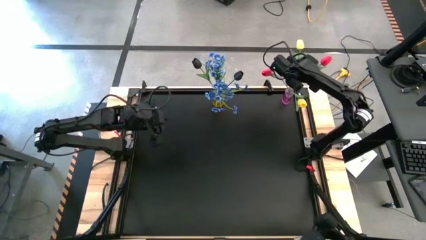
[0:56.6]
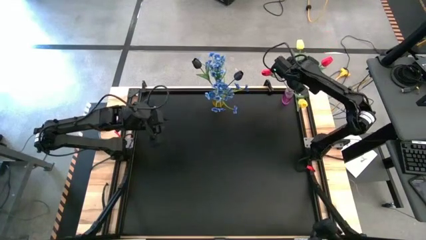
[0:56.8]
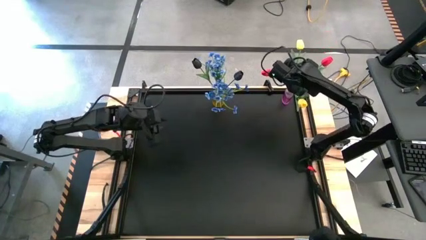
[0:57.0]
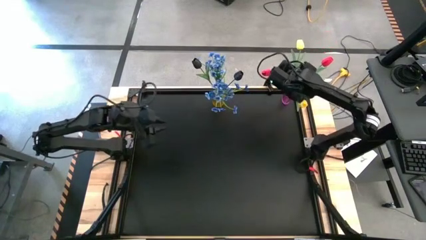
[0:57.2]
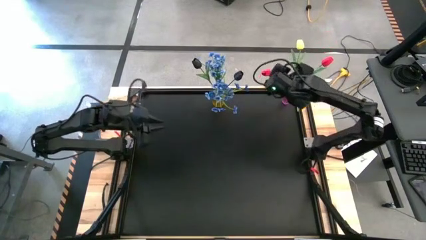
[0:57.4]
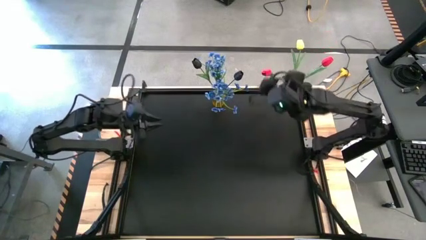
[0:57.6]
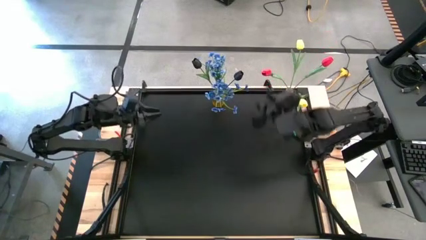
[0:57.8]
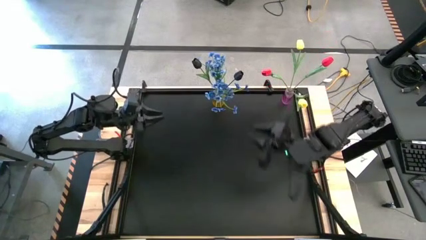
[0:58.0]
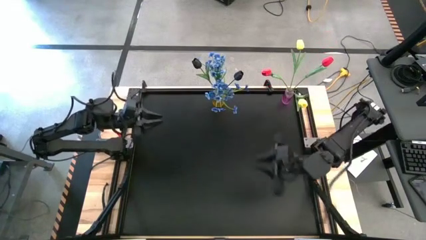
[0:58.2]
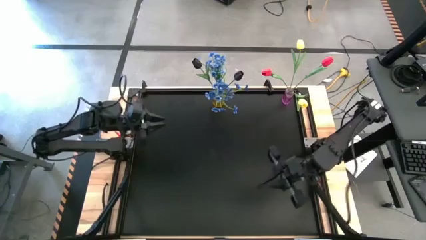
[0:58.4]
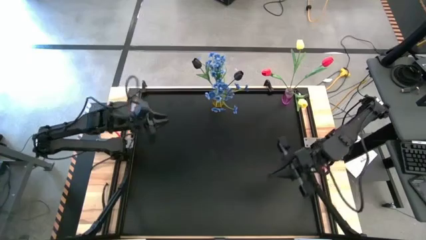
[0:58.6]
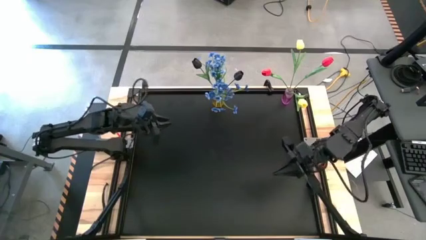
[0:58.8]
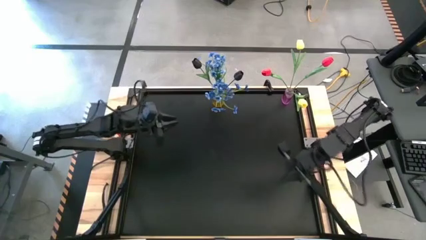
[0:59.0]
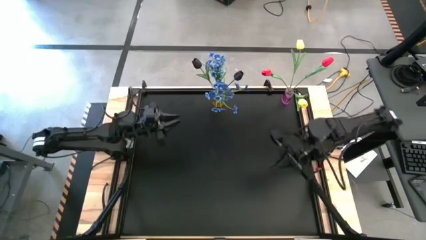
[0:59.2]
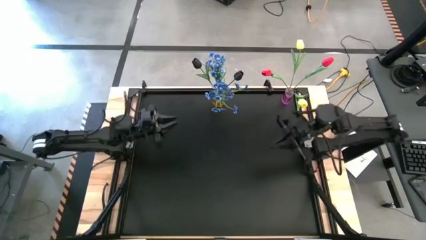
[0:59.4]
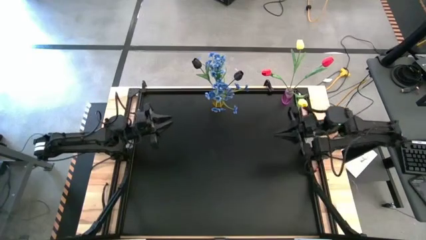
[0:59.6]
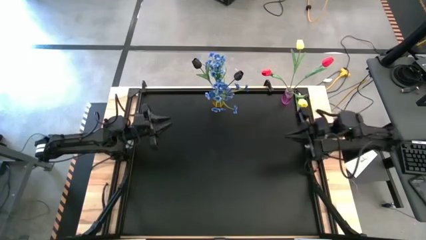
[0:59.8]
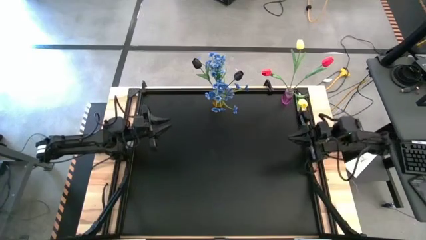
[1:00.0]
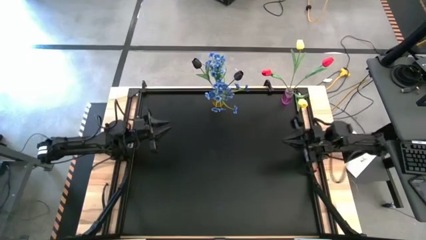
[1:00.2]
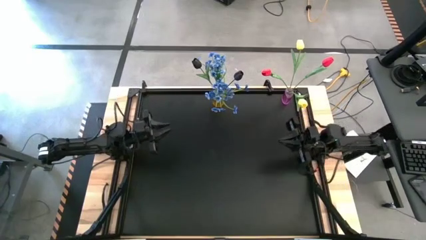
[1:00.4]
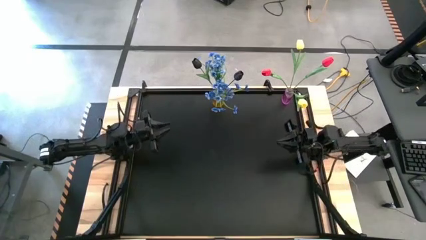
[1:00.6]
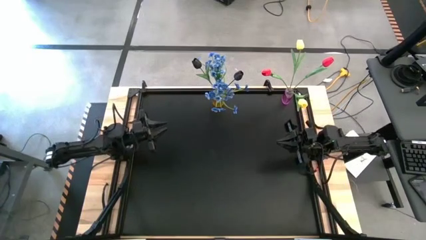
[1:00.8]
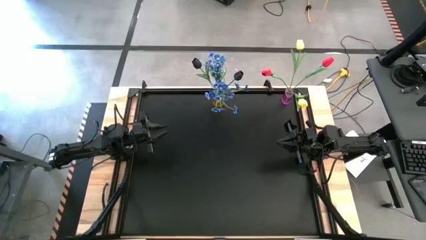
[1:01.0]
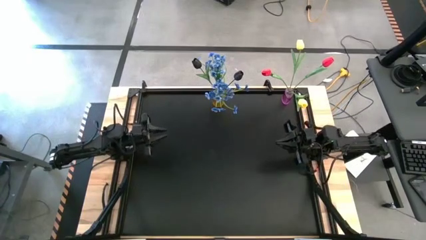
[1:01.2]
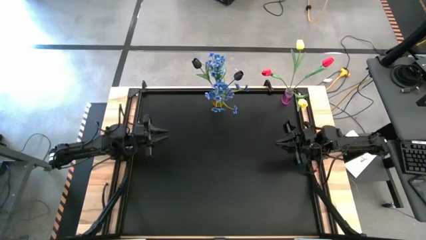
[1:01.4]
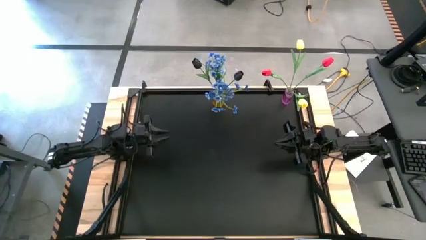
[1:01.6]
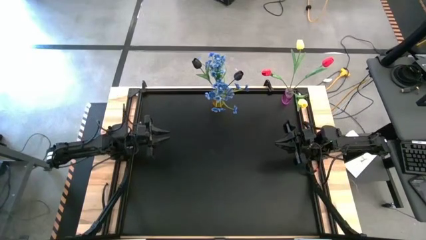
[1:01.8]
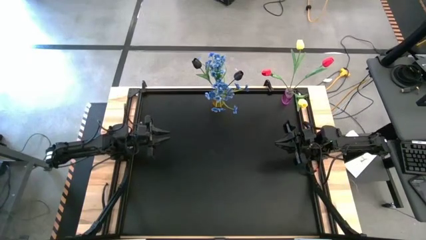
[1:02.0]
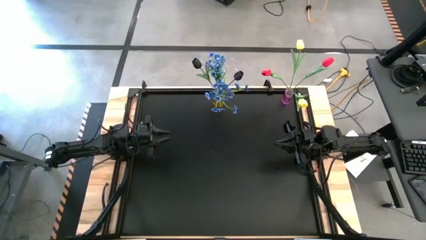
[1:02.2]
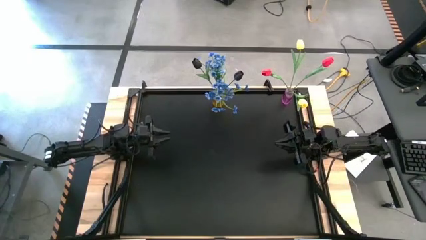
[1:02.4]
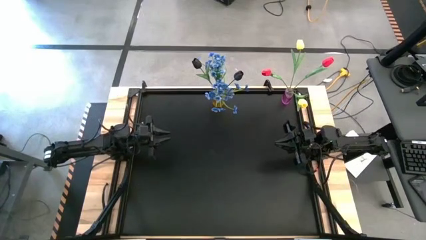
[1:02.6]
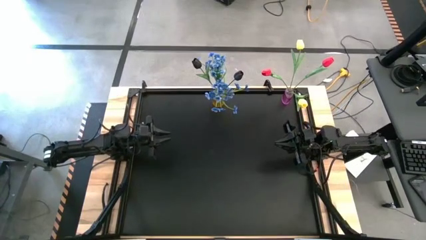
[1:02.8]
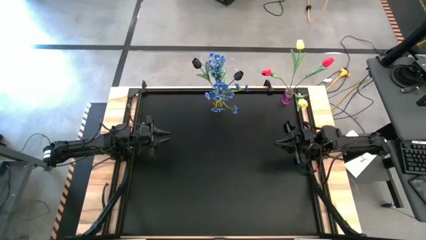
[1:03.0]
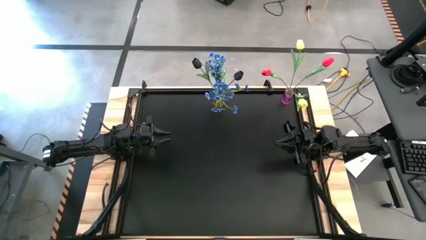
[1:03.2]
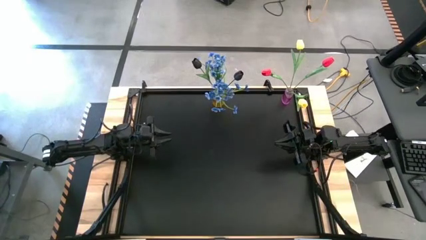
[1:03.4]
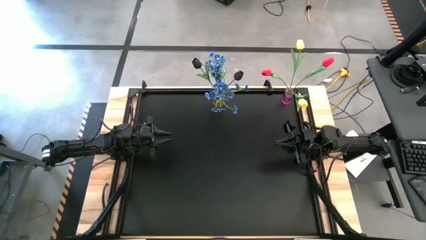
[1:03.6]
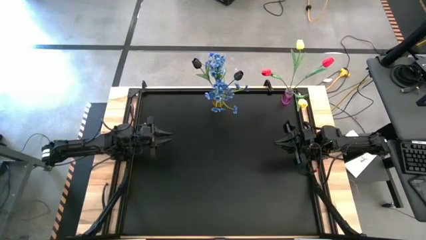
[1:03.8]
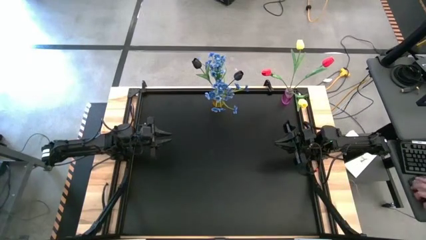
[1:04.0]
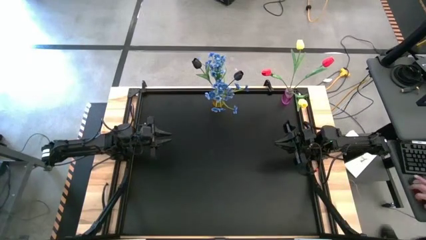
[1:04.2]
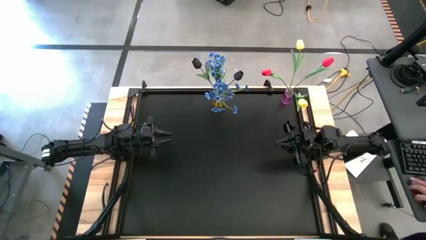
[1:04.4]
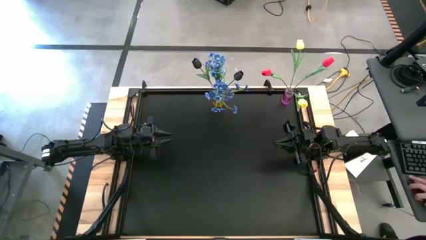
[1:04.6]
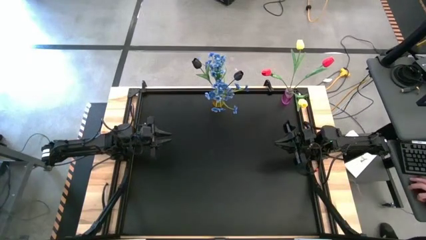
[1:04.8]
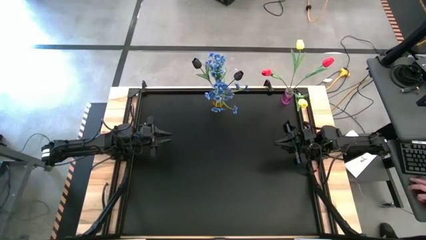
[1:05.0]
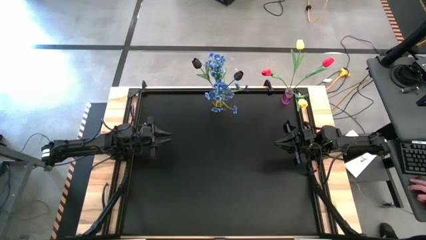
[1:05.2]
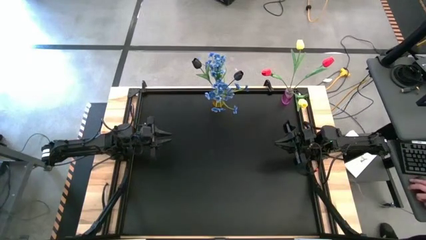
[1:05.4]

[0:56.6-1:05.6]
Task: Sort flowers into vase by color
Return to Home Position

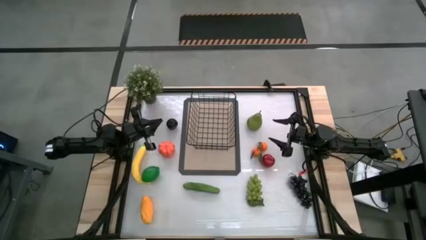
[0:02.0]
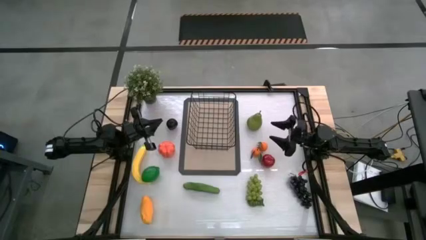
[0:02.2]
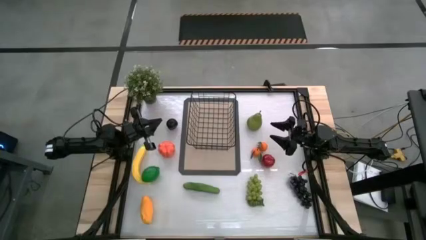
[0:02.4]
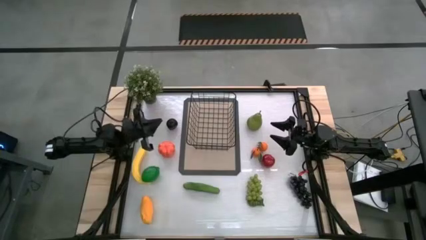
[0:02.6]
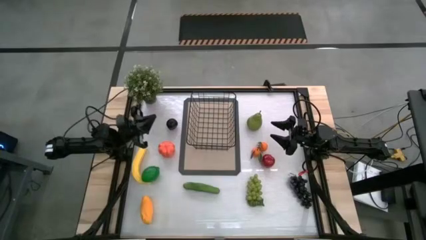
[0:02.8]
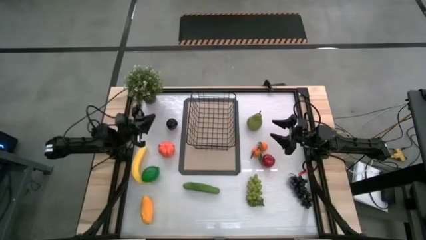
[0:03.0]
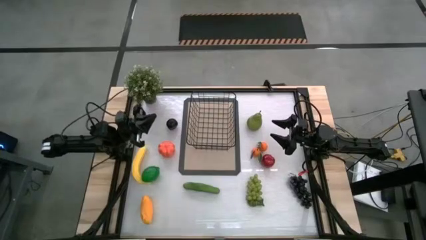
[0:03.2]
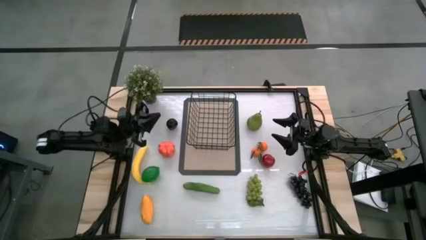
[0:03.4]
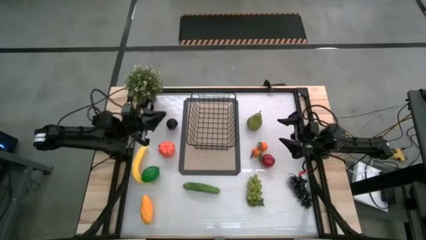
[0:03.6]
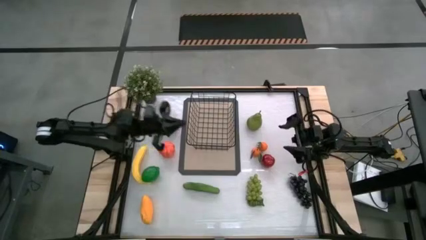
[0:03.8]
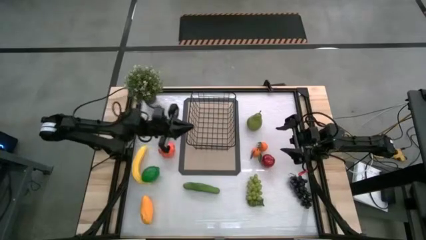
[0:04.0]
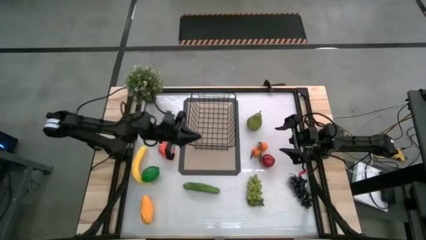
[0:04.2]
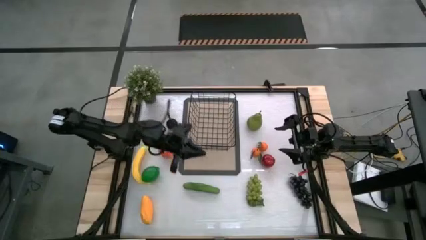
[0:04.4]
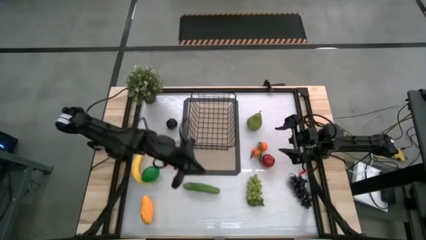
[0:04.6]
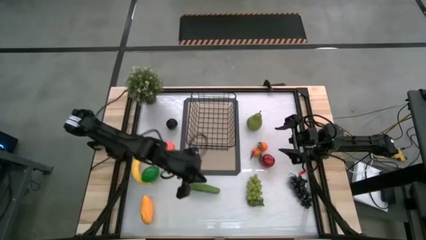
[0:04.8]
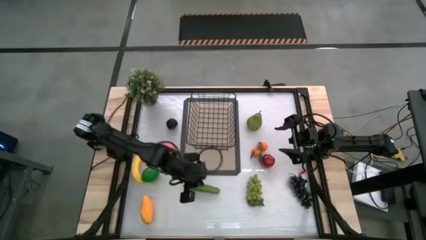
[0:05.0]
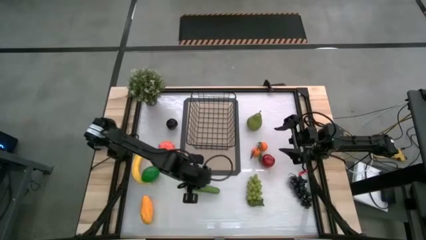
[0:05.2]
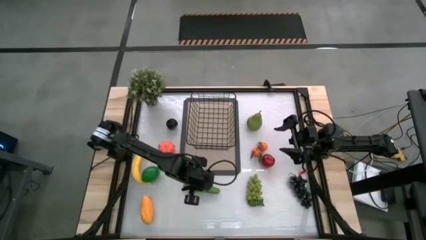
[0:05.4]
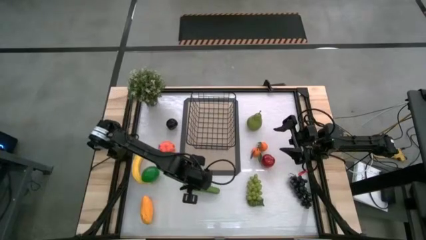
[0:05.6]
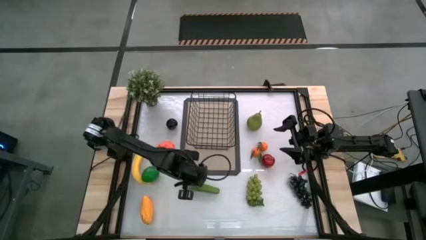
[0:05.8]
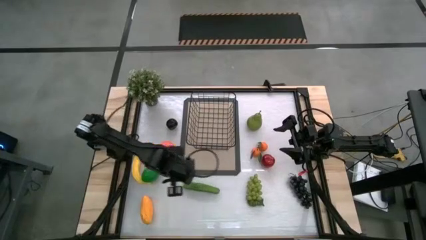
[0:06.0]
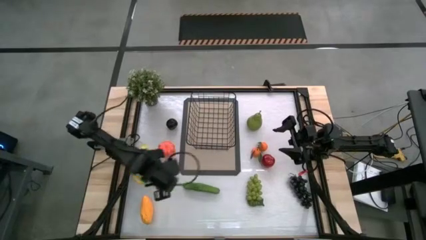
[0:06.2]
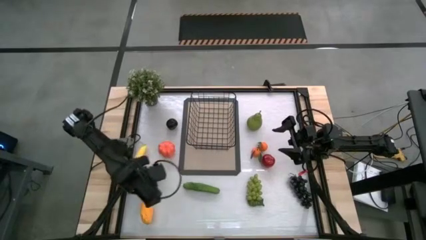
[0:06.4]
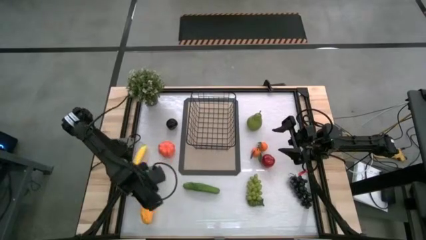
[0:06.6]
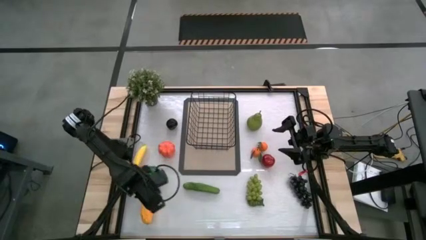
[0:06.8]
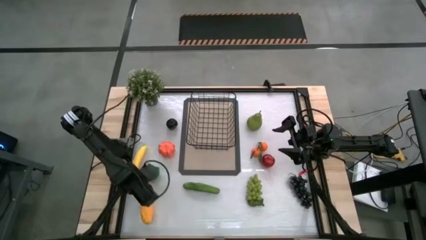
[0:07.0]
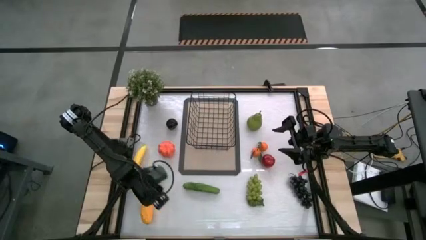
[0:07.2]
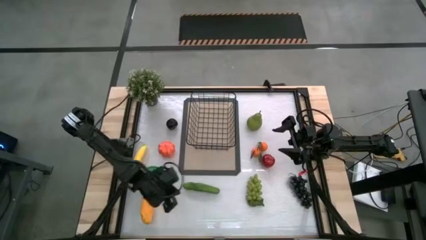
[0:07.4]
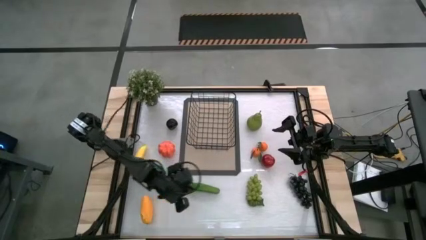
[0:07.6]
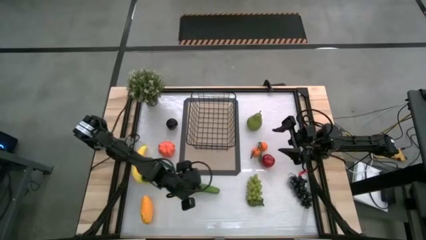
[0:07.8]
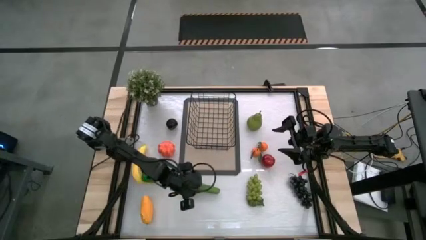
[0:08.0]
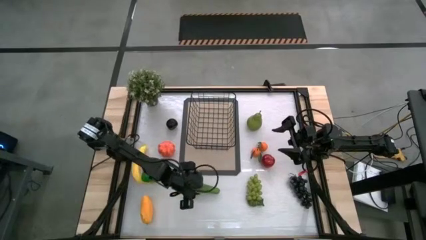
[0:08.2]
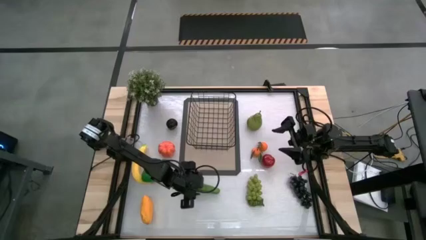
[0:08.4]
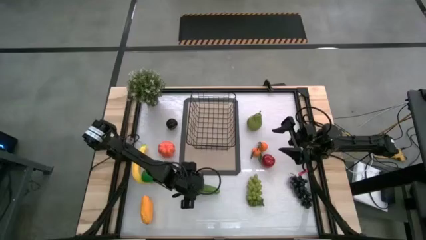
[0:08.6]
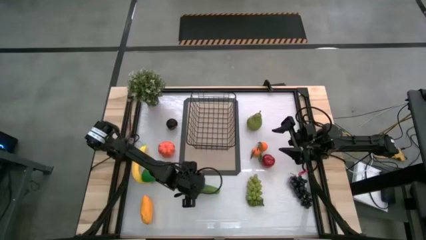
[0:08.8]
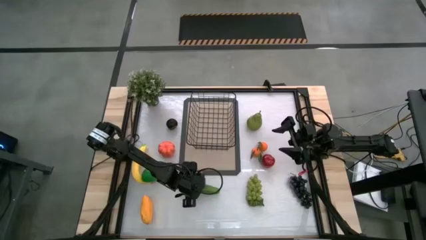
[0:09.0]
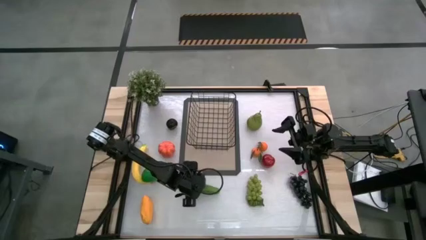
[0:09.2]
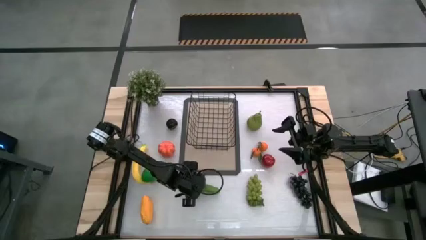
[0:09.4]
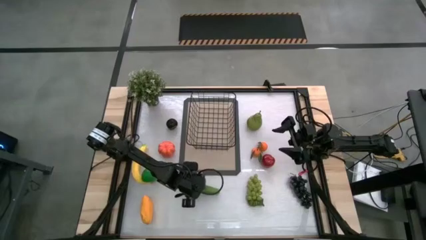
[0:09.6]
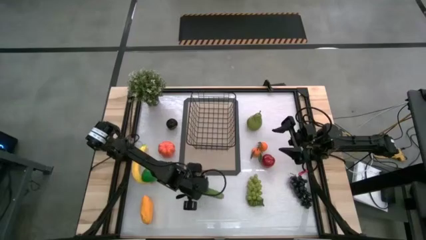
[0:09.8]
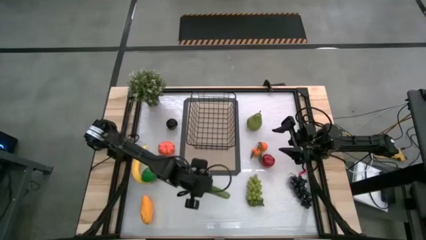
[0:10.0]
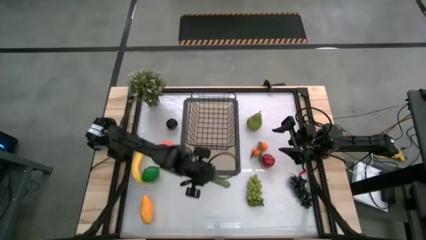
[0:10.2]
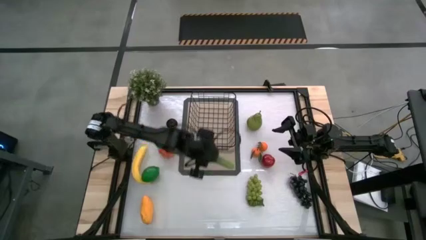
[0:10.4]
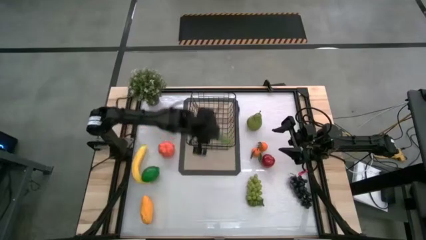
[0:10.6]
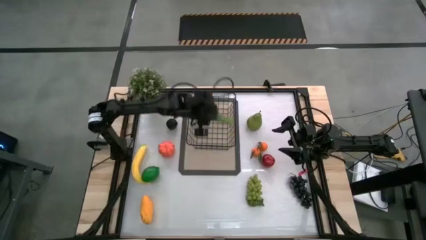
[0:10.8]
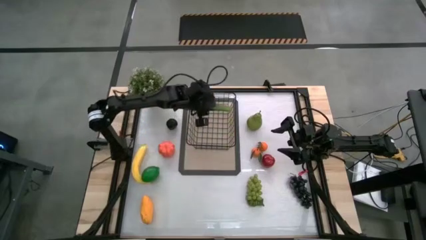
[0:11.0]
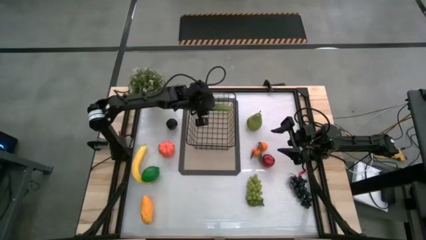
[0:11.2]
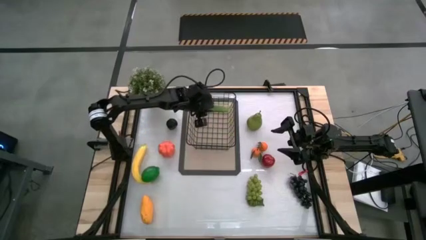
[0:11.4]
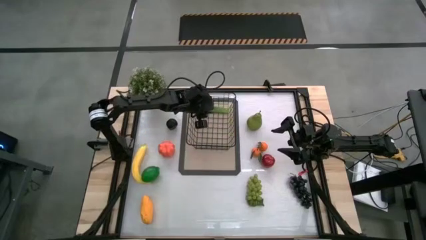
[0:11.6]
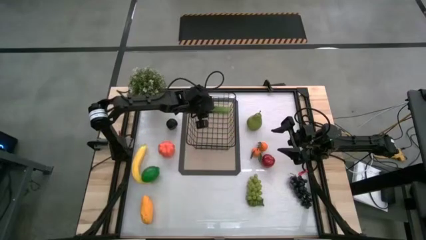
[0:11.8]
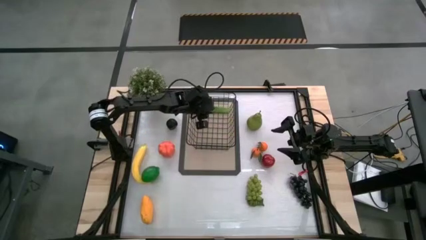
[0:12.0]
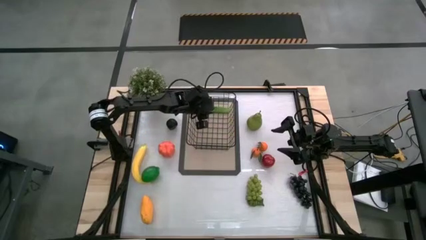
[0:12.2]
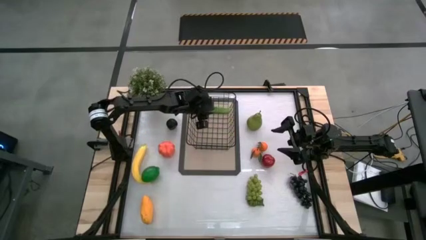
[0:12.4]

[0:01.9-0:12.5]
Task: Build produce basket
Put the cucumber into the black wire basket
